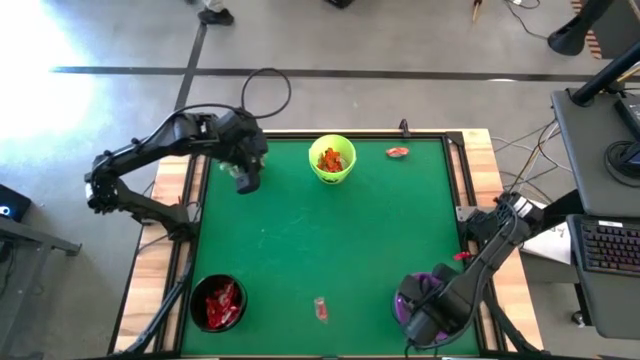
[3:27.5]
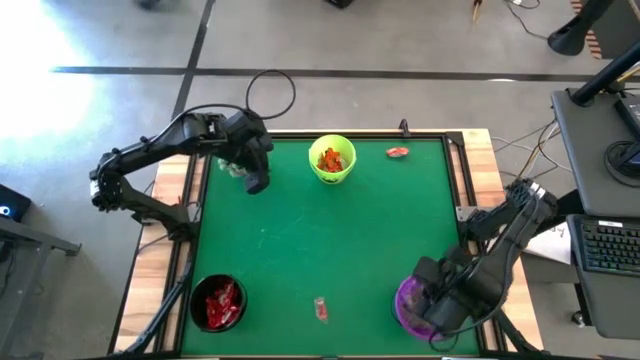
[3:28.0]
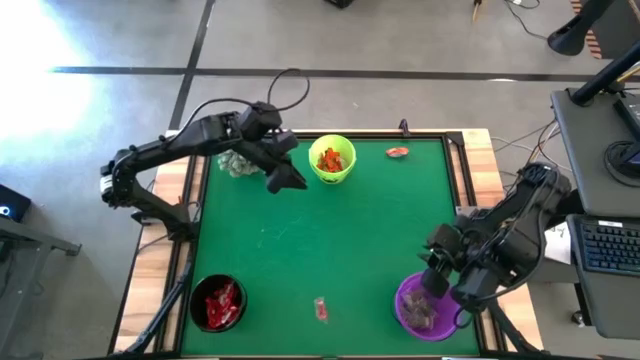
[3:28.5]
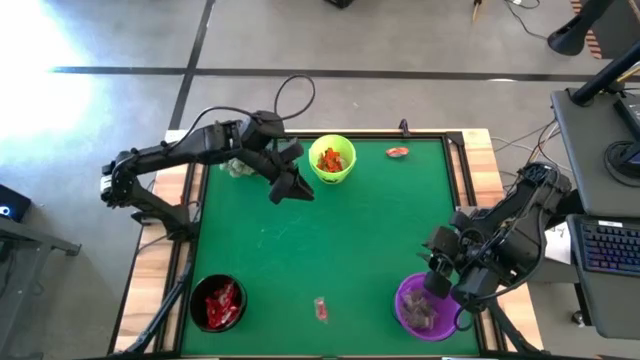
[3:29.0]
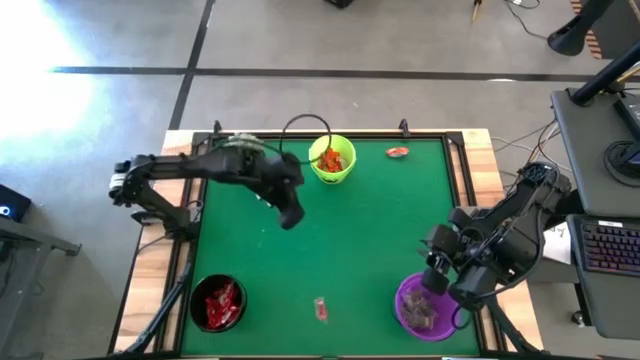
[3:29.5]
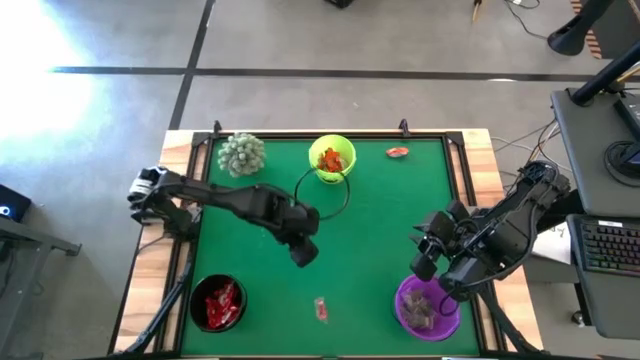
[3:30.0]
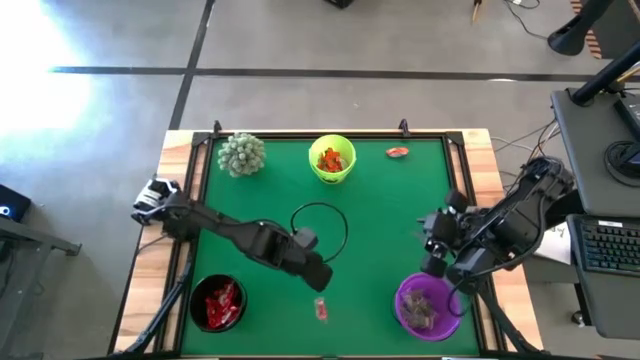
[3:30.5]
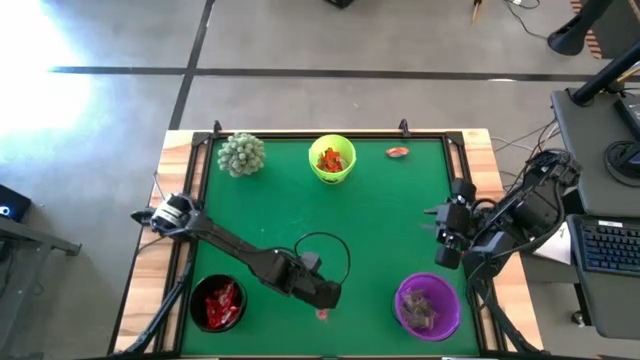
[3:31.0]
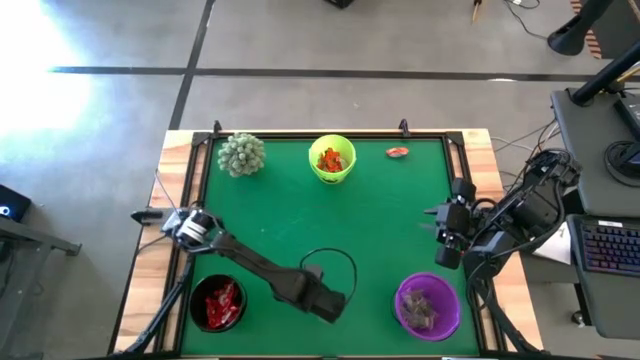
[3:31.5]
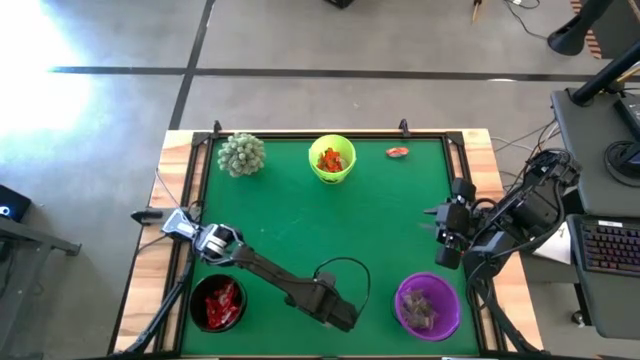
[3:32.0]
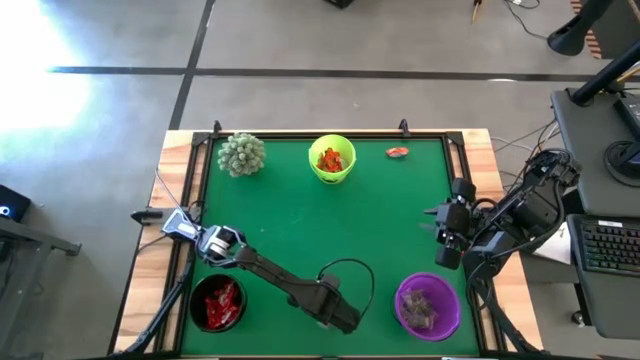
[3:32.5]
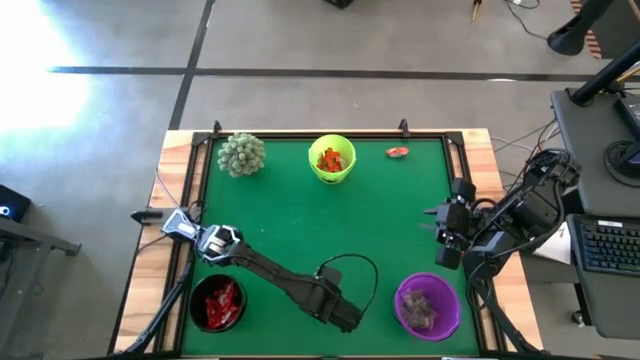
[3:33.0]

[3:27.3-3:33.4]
Task: Organize candy in baskets
Put the red candy into the violet bucket

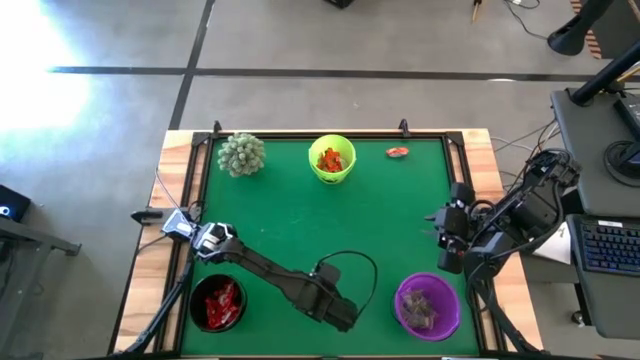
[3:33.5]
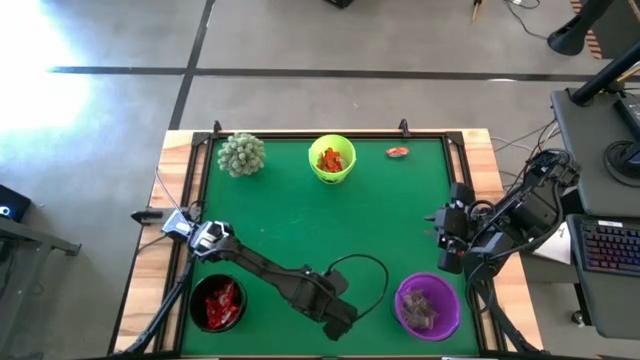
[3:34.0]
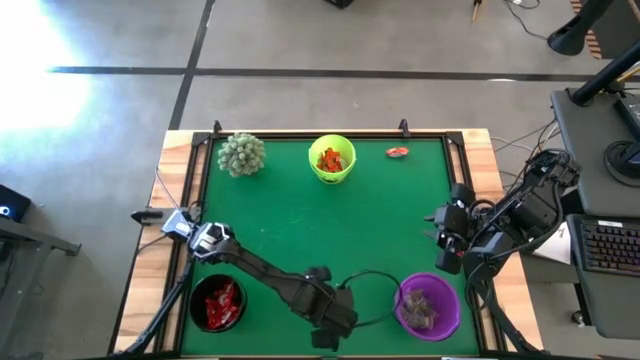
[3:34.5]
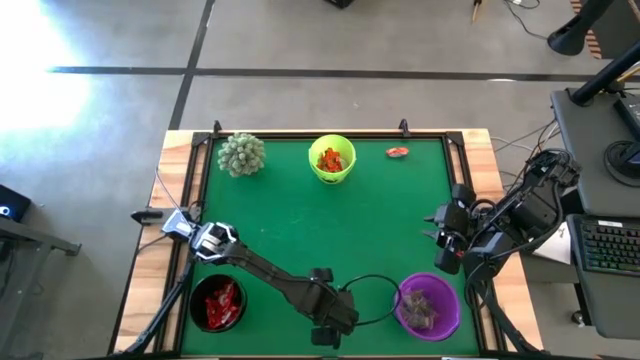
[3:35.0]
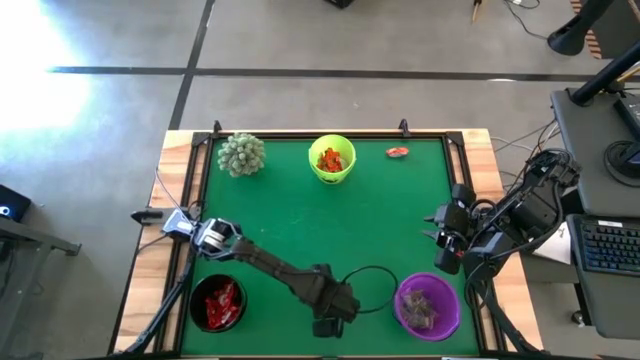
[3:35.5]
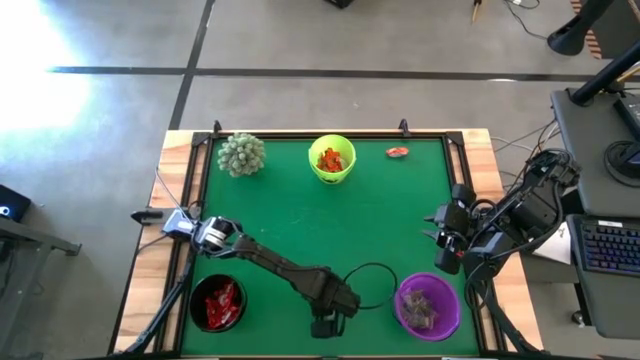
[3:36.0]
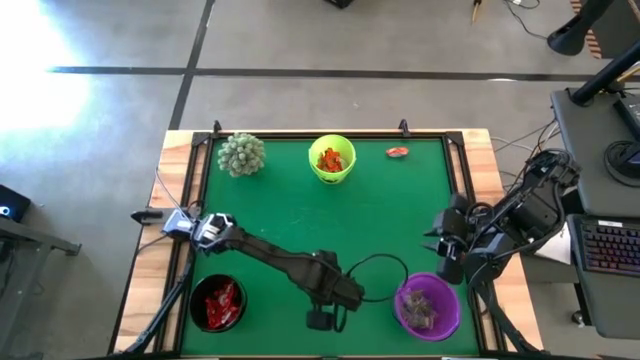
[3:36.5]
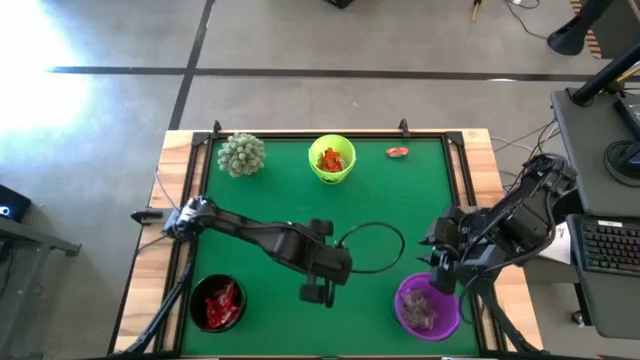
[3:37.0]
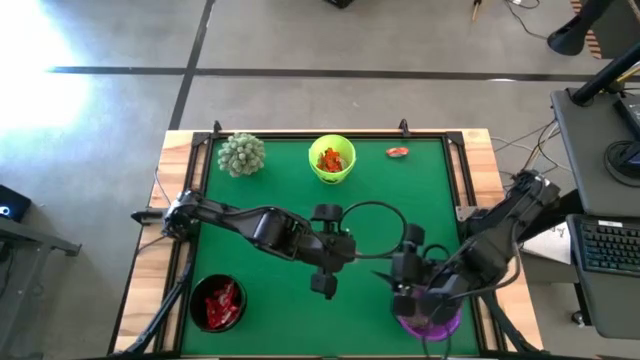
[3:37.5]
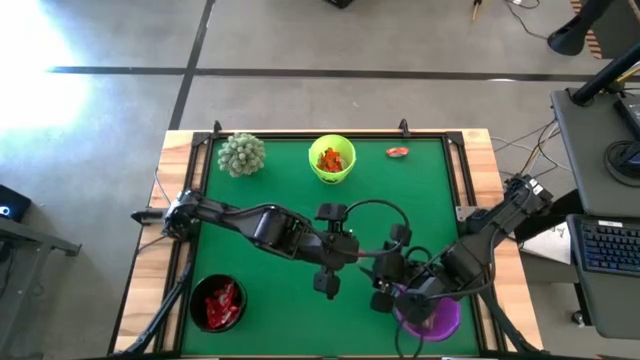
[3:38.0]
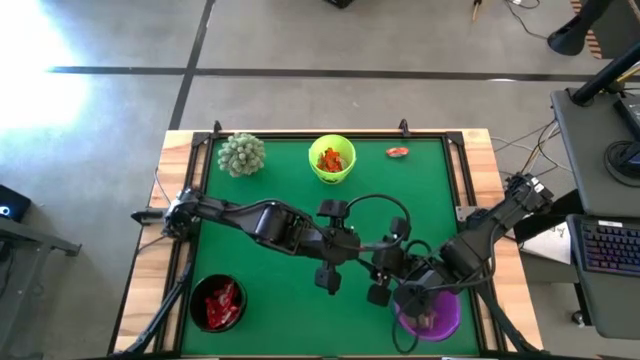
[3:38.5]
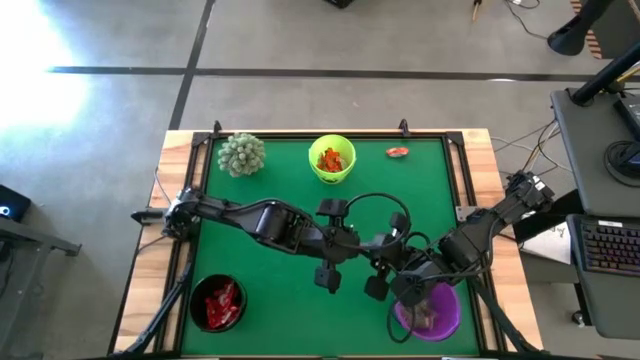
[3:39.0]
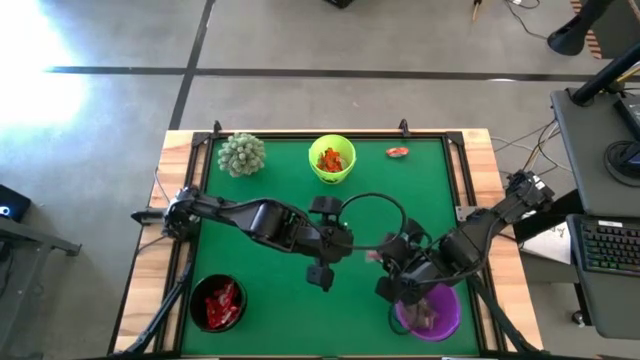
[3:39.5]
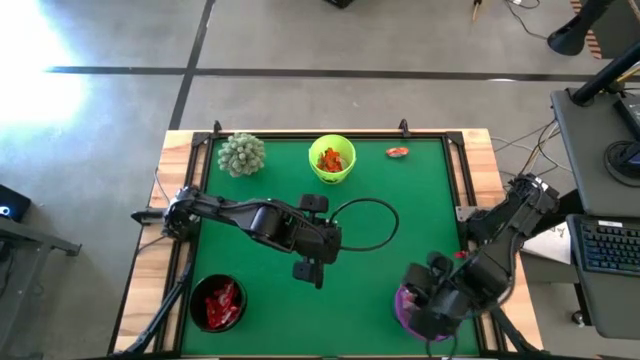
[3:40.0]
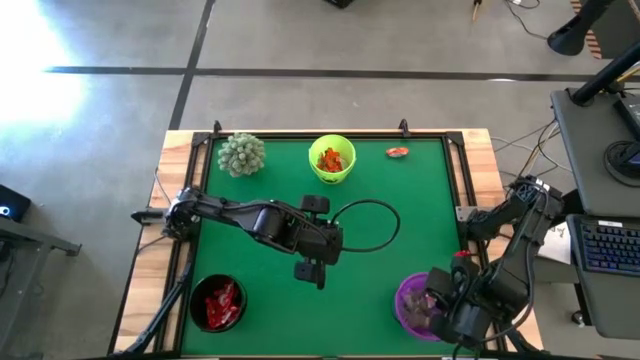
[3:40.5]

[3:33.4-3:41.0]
Put the red candy into the violet bucket

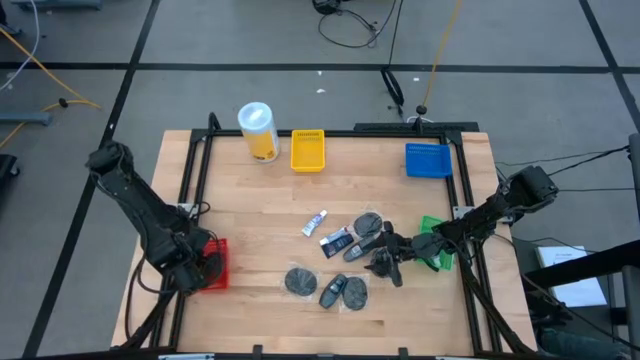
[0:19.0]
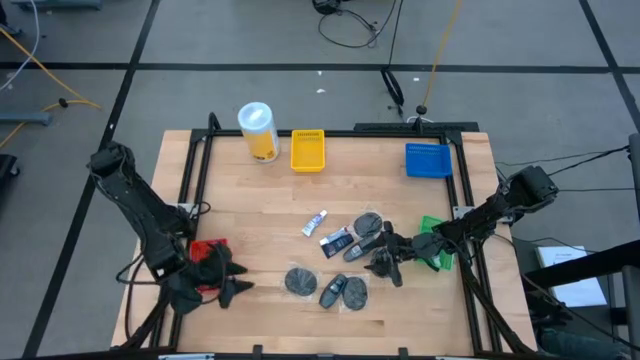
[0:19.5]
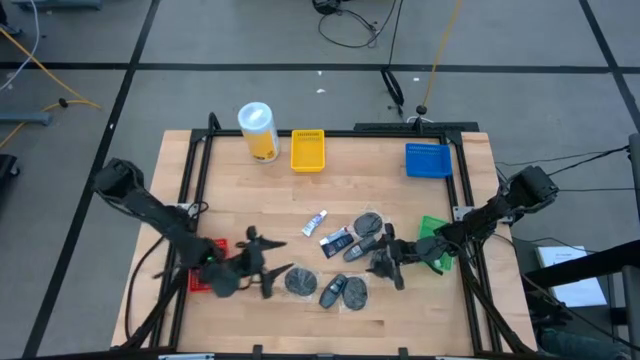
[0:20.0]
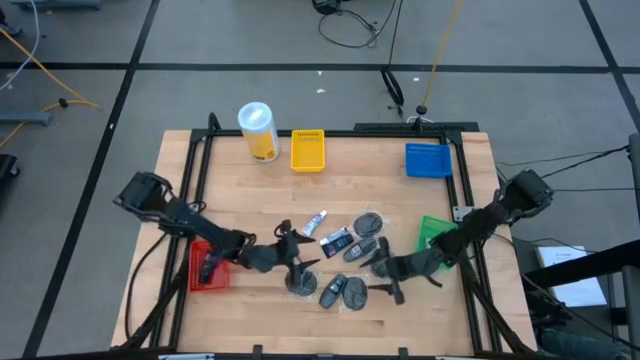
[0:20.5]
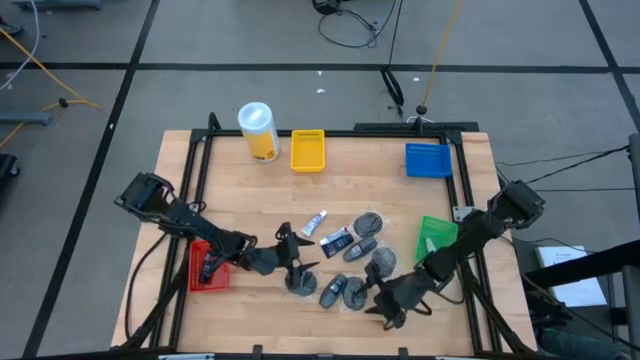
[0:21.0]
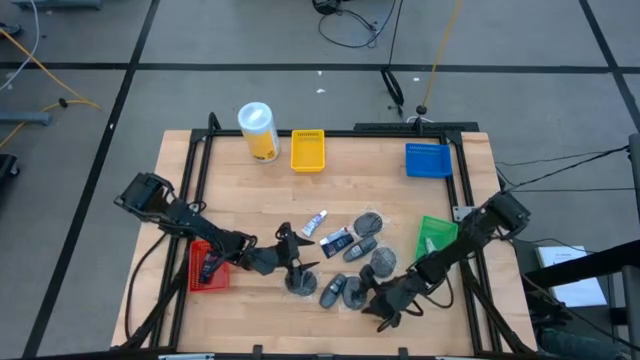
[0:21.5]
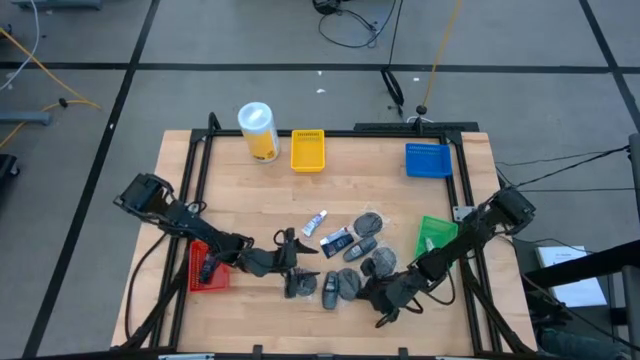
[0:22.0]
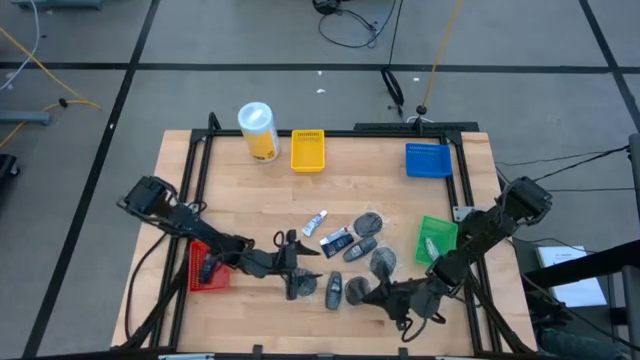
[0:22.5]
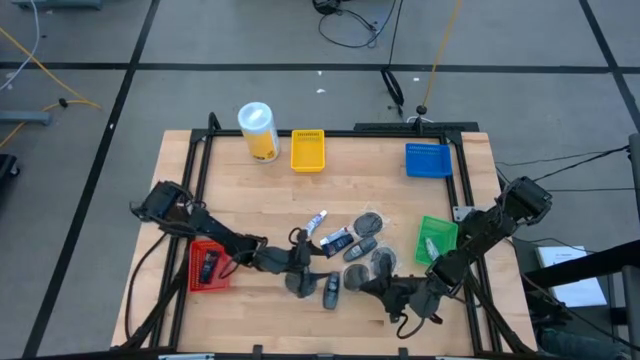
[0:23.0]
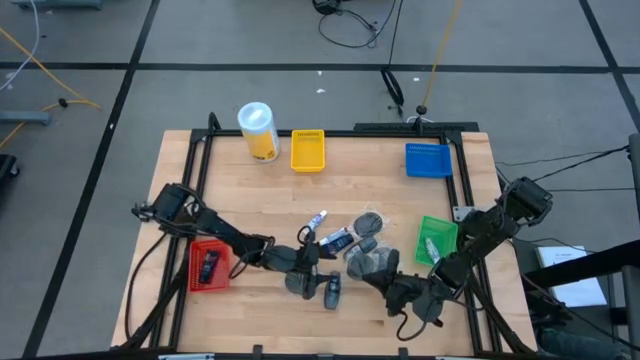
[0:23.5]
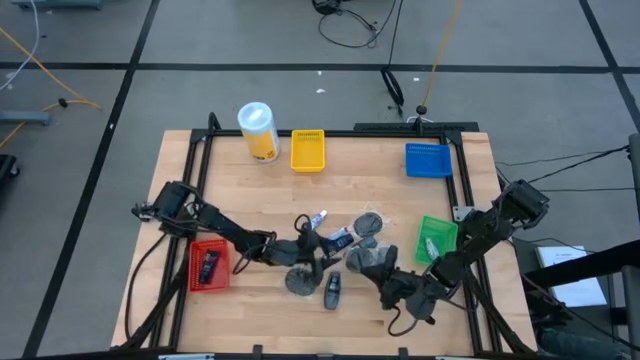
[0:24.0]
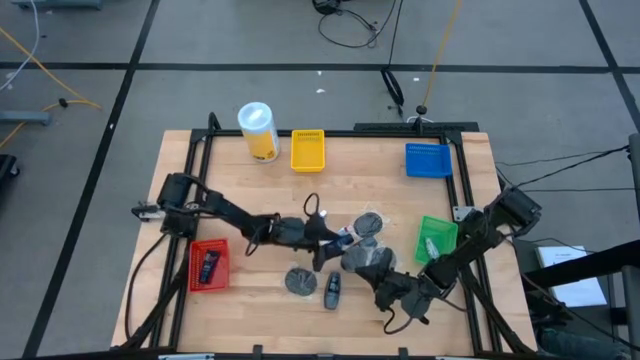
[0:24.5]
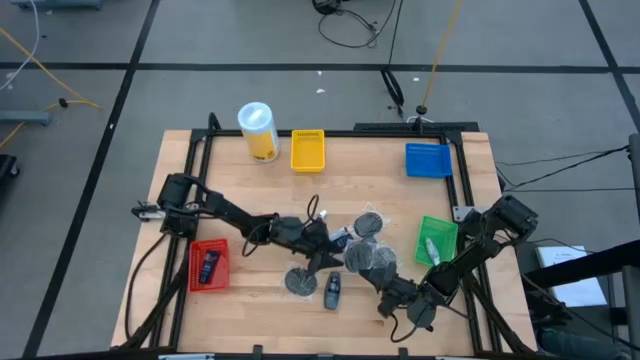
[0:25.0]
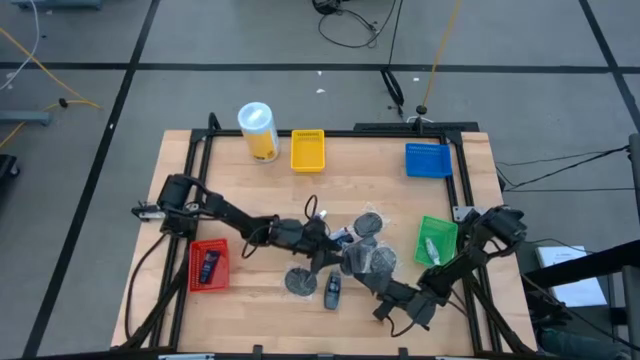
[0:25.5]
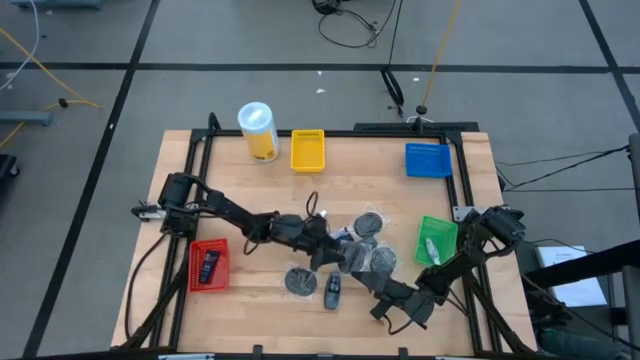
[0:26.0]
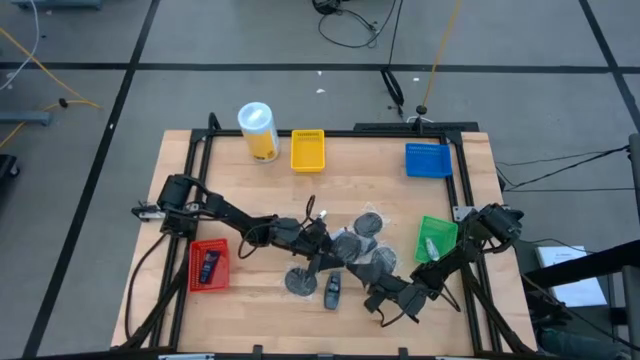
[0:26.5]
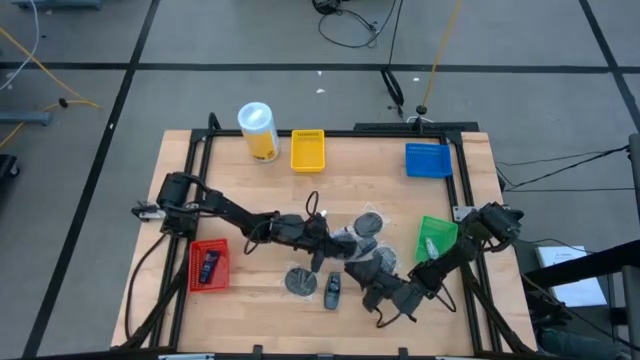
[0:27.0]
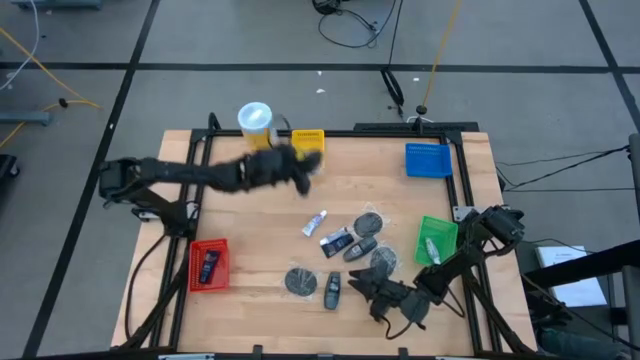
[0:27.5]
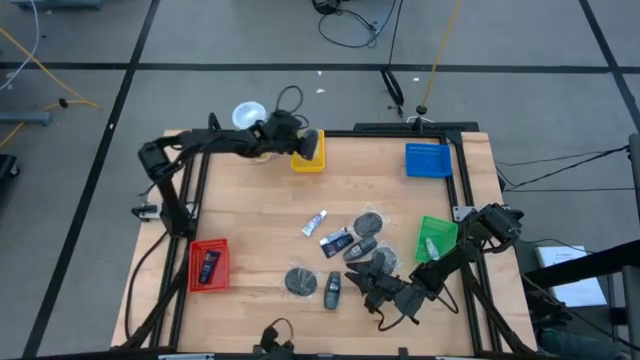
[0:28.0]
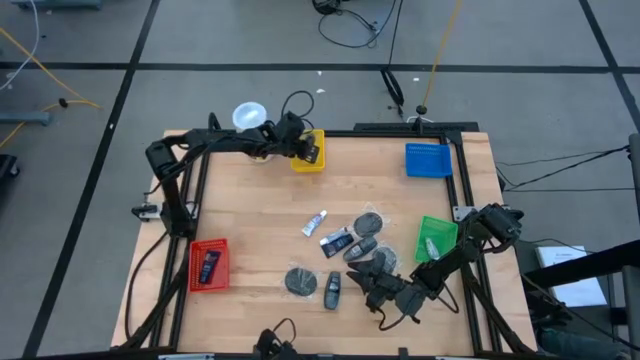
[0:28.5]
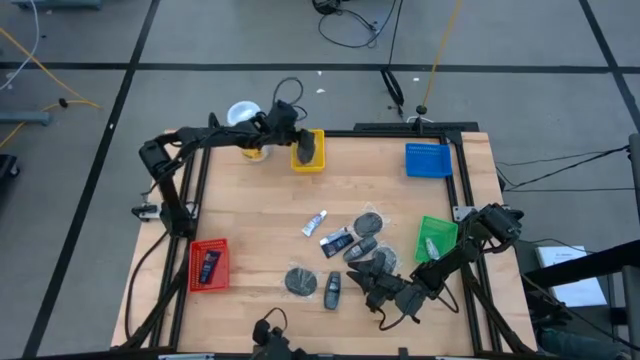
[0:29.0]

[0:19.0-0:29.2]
Task: Pick & Place Travel size toiletries
Put the hairbrush into the yellow bin
